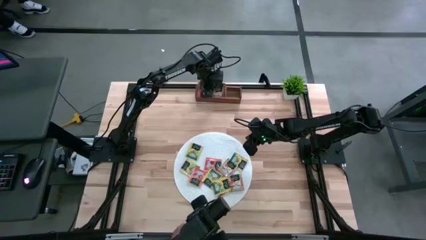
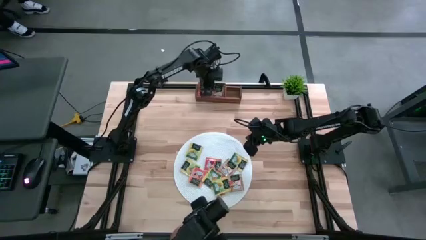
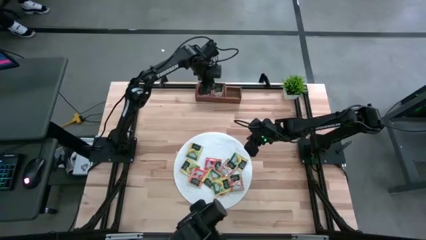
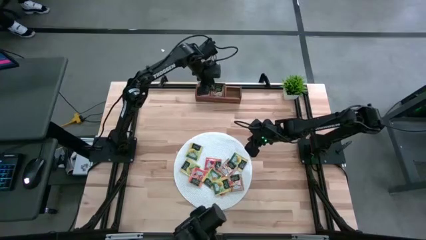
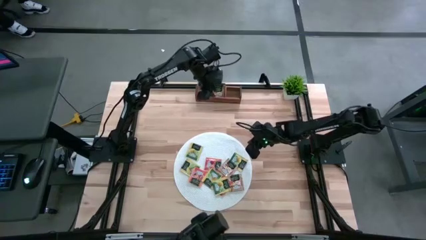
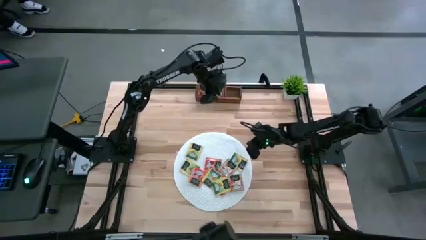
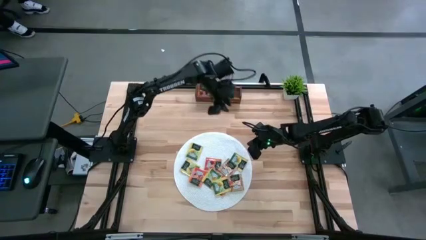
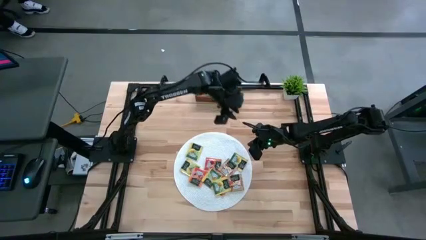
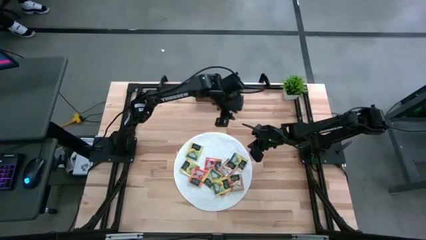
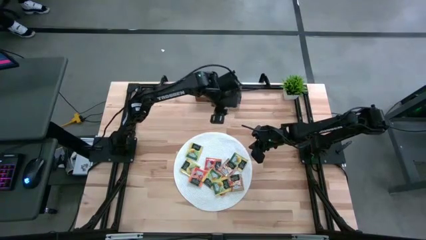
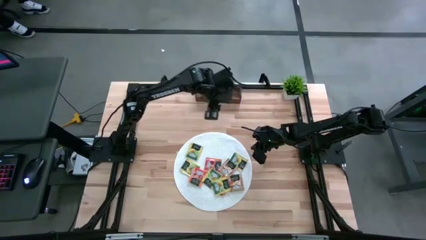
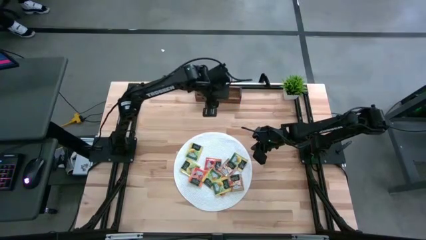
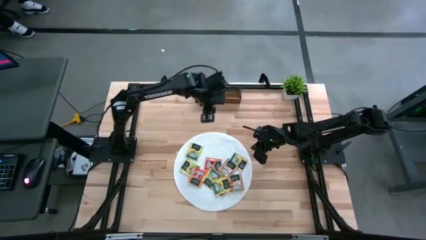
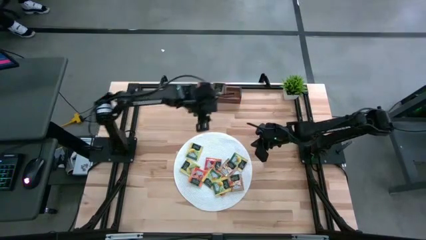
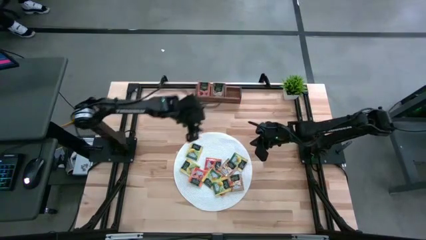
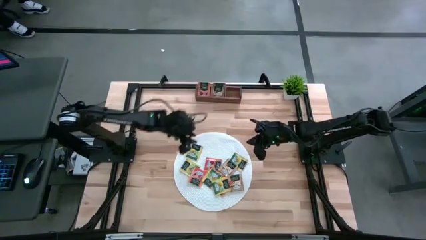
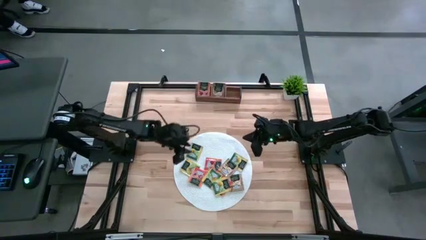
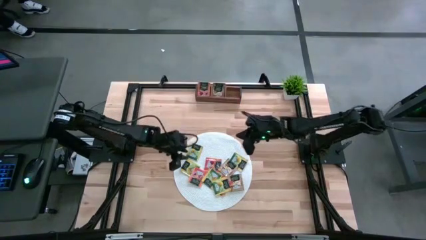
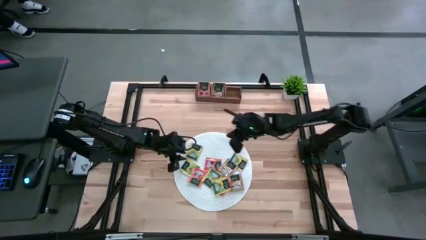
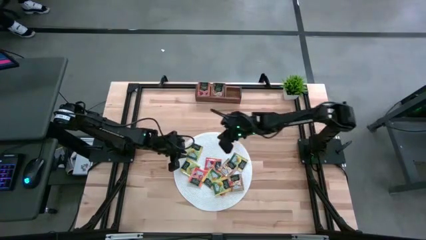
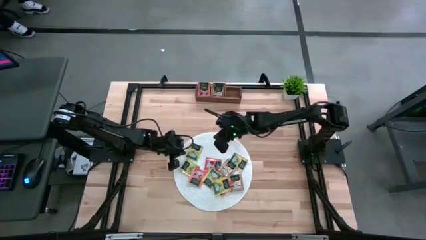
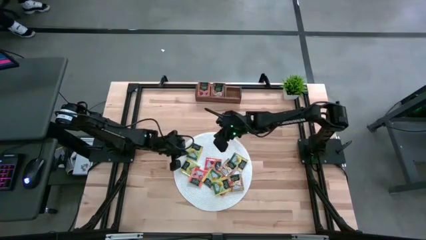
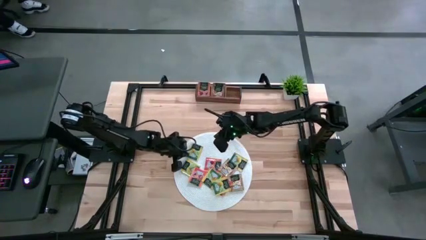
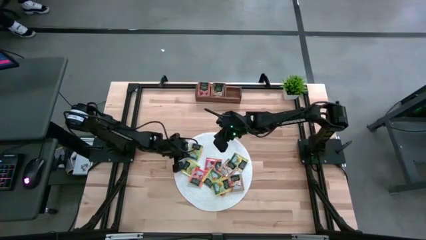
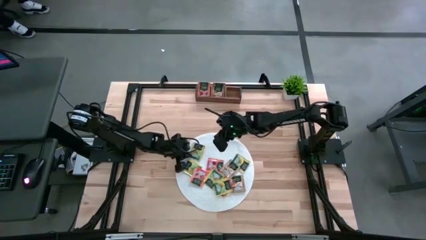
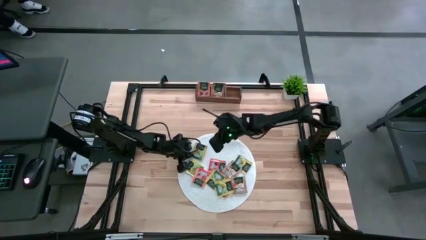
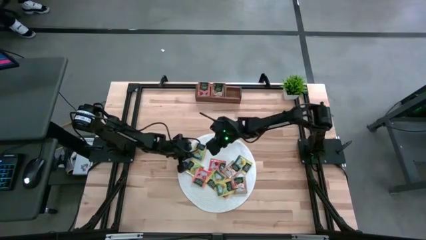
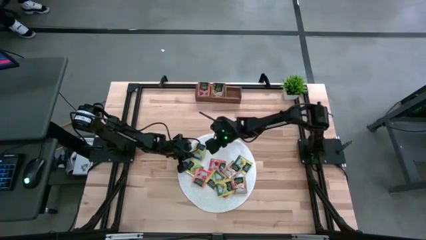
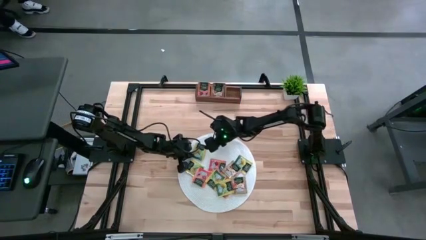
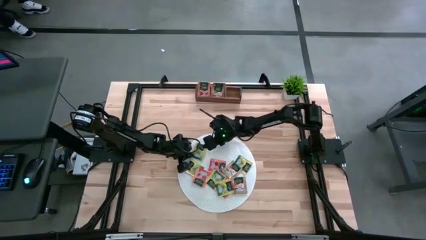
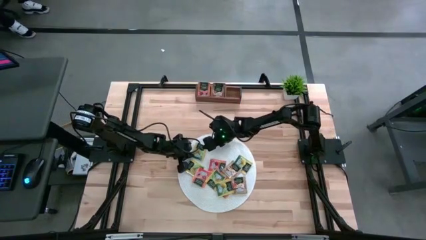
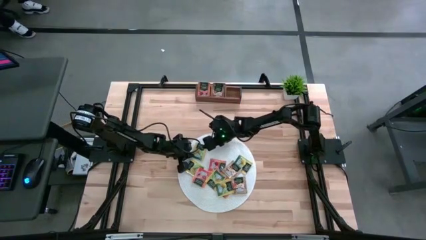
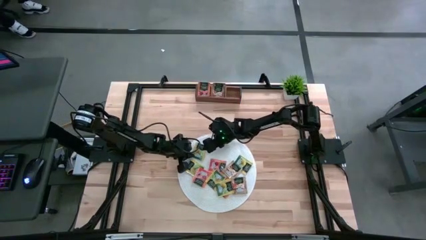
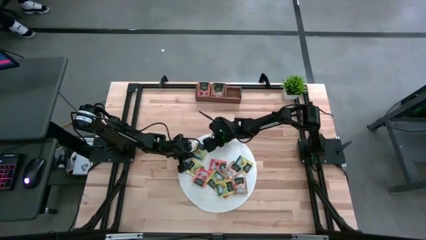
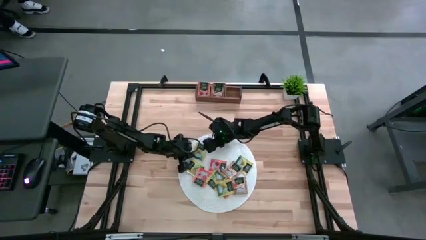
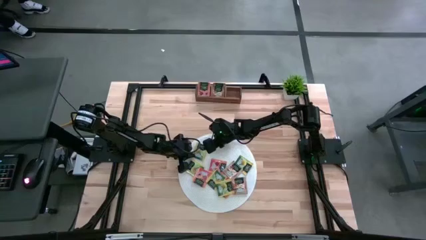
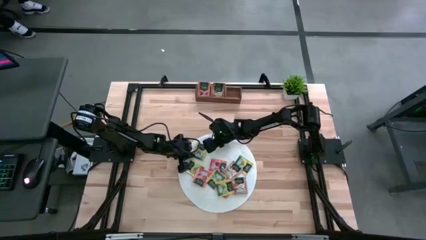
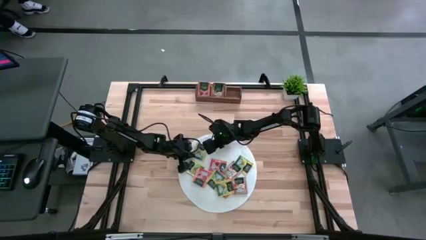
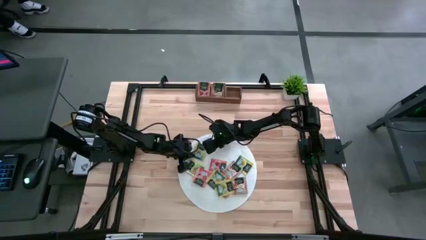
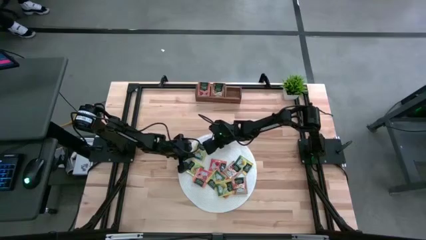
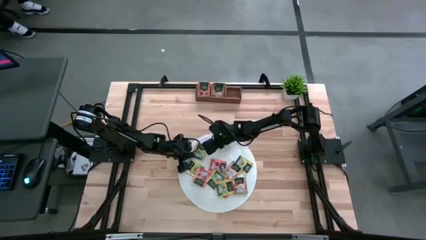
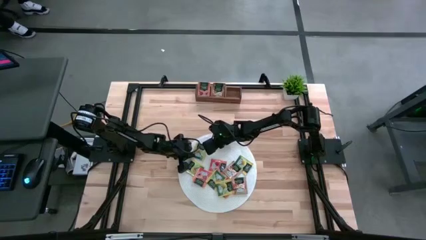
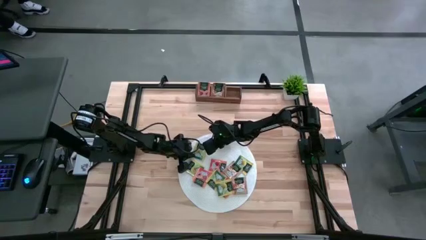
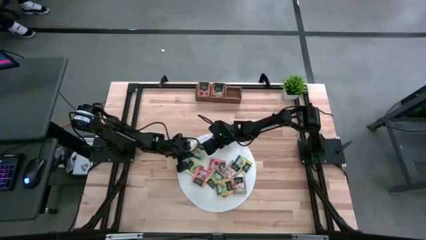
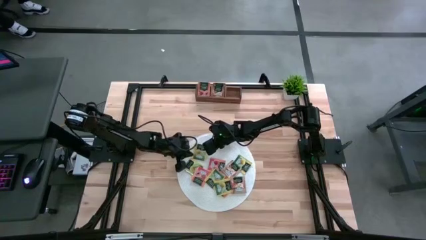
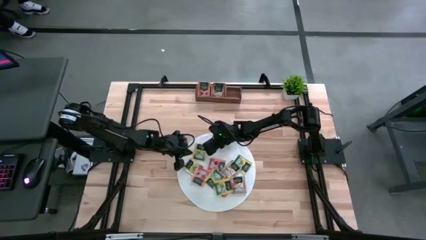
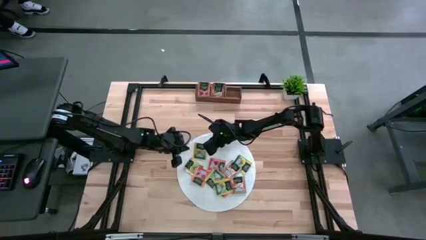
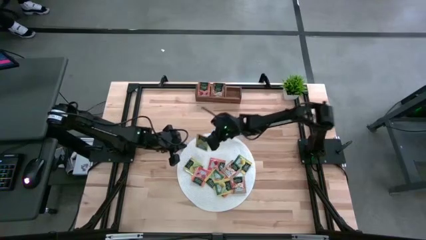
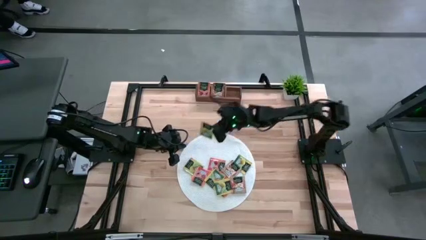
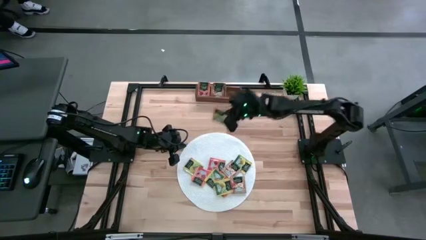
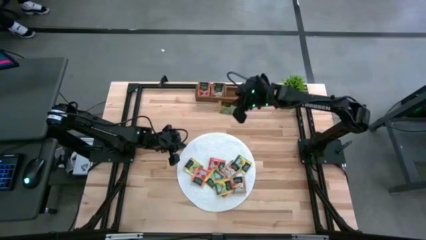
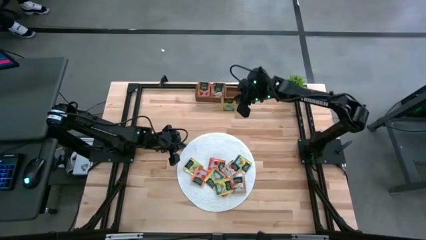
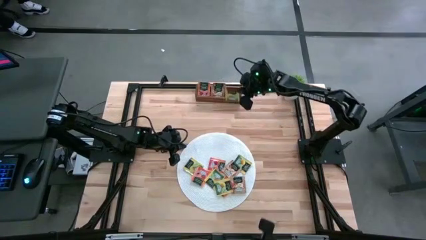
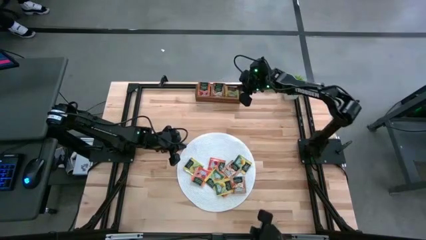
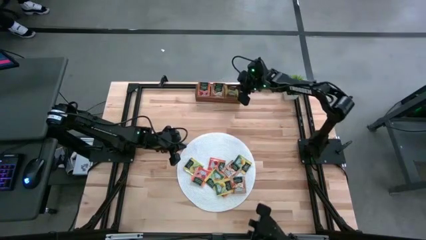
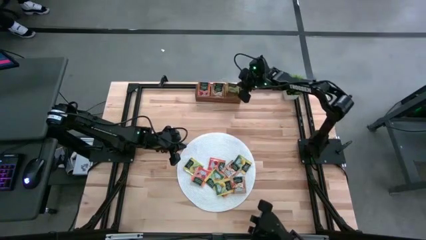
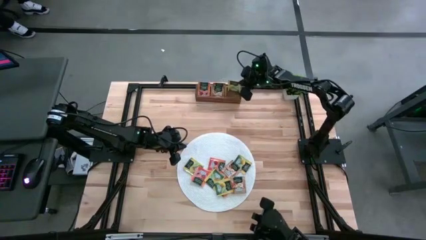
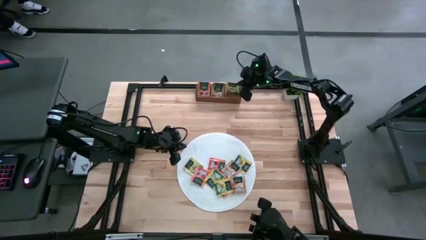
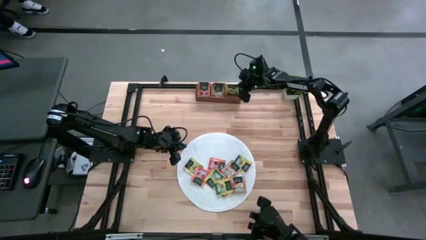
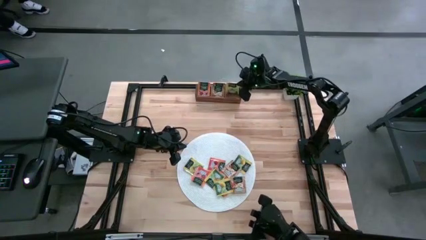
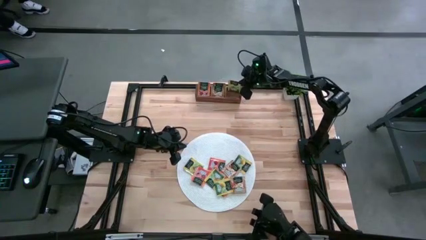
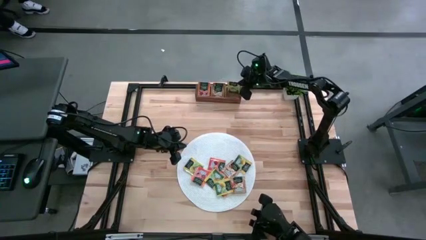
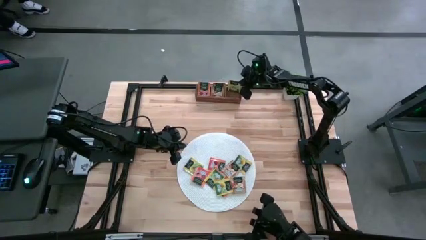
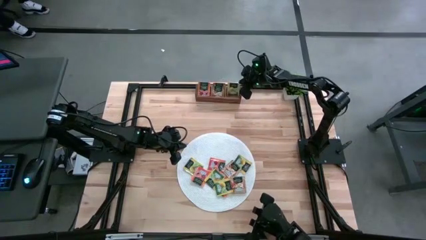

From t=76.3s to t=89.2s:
Task: Pick & Place Tea
Put the yellow tea bag into the right section of the wooden organizer
